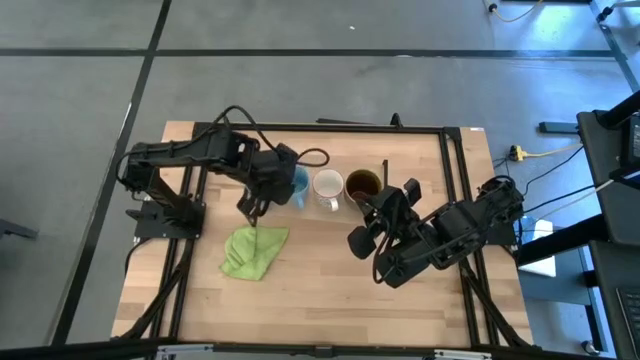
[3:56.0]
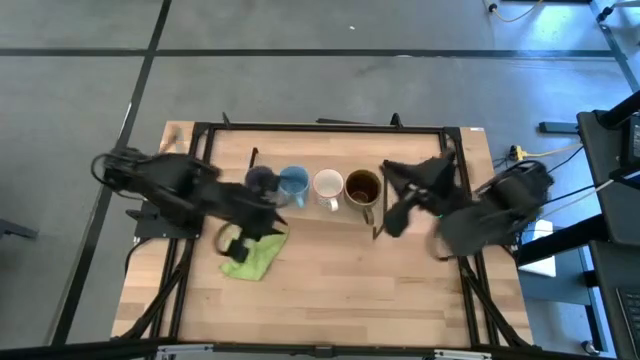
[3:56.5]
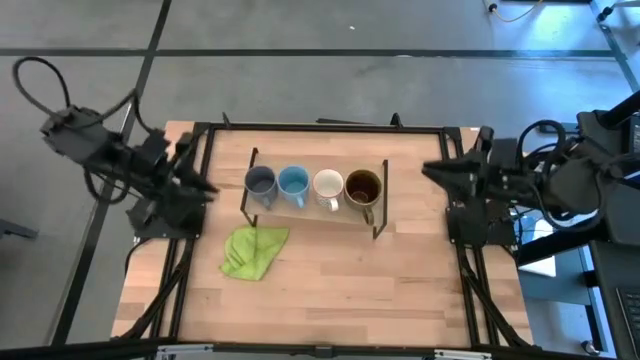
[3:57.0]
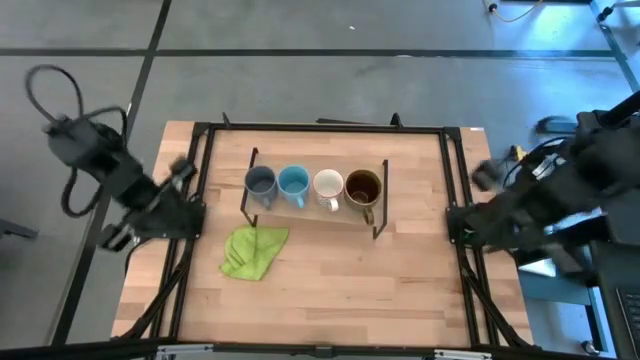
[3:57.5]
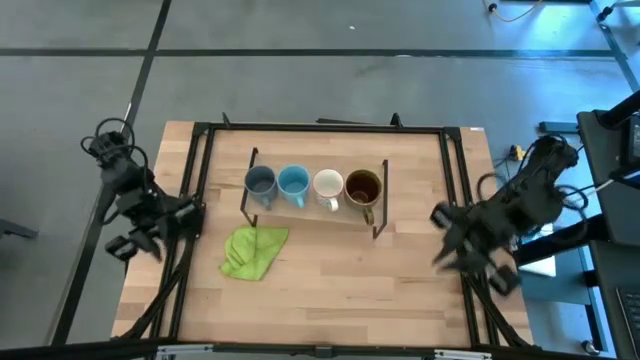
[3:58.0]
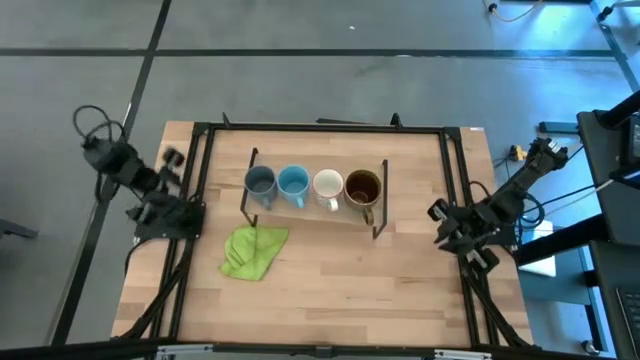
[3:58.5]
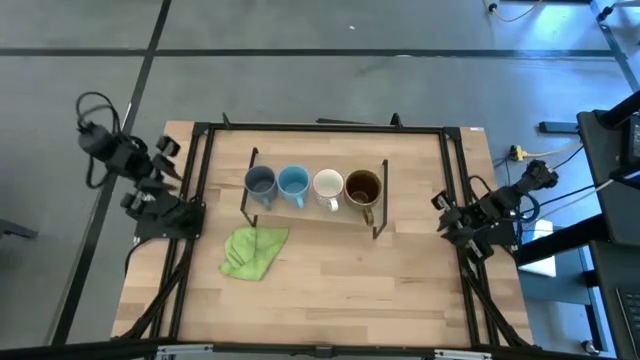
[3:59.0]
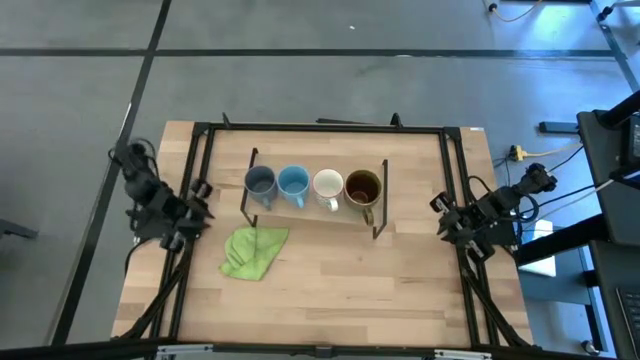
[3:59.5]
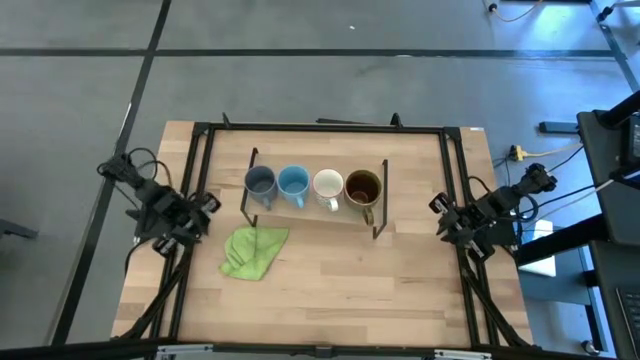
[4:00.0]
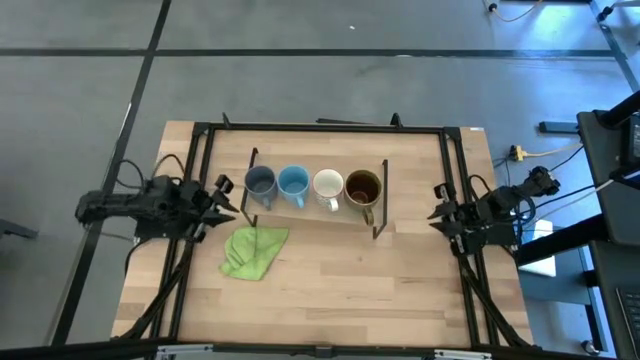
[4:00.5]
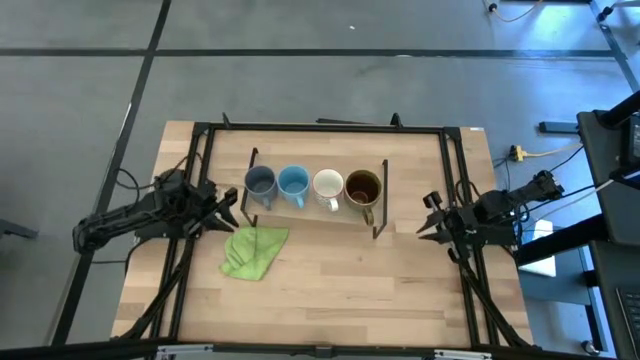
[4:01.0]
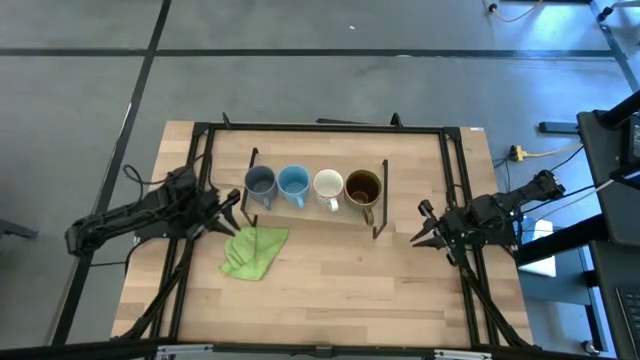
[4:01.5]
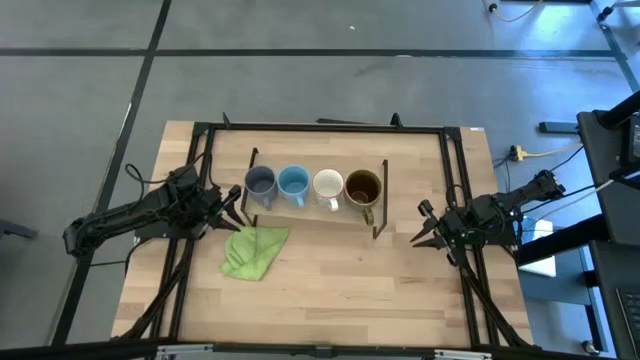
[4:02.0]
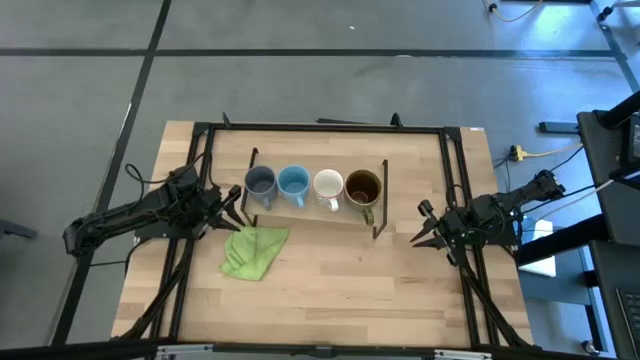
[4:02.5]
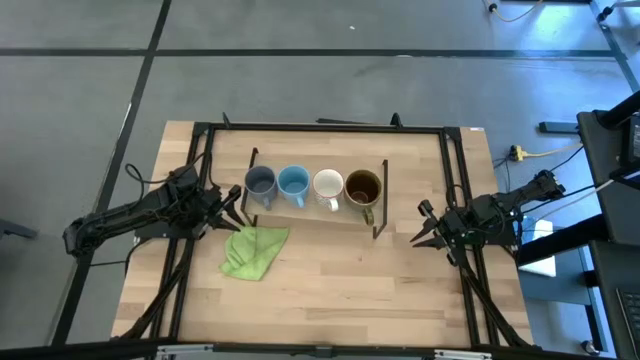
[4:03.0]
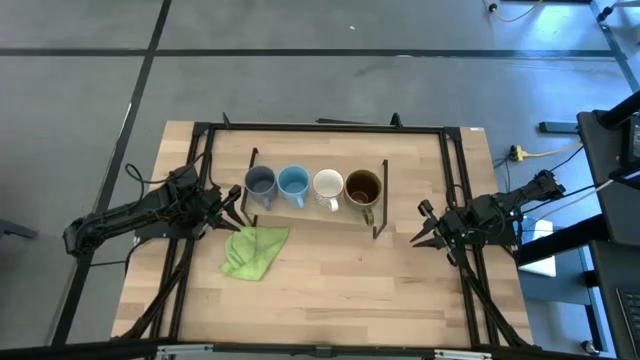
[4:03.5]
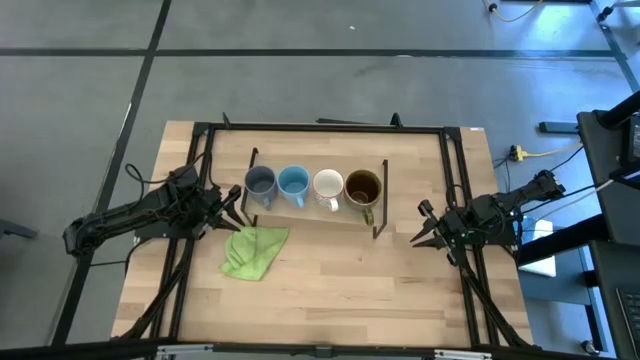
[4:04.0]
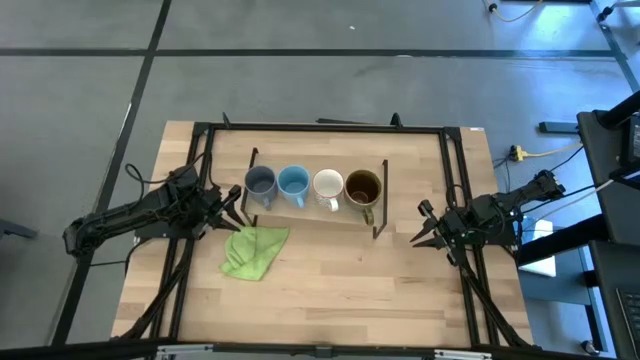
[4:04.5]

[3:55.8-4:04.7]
Task: Stack small to large cups/mugs on shelf
Return to Home Position

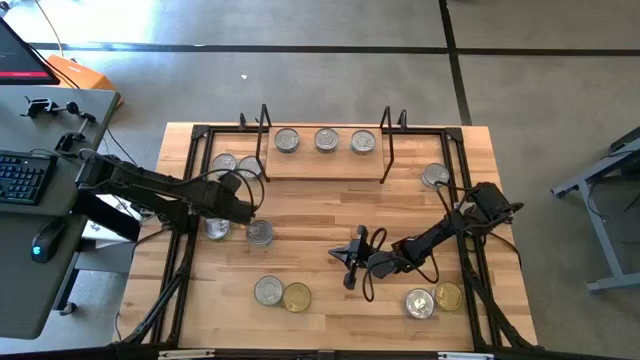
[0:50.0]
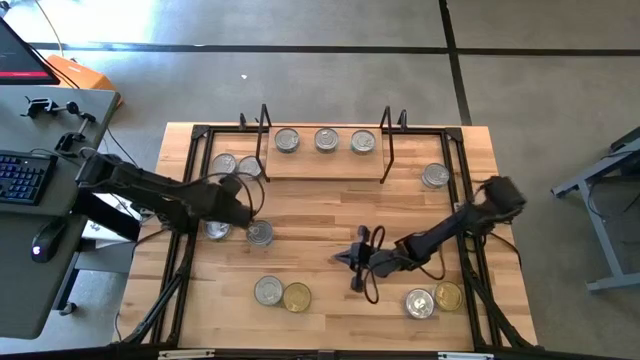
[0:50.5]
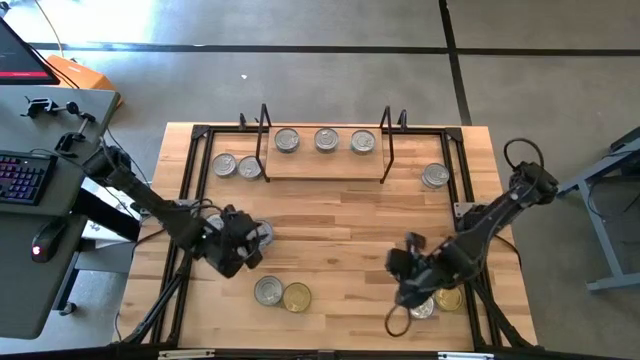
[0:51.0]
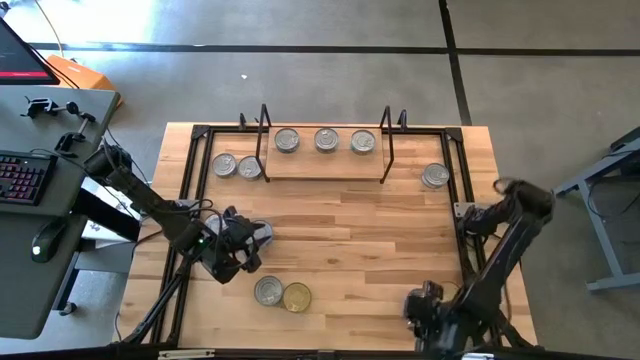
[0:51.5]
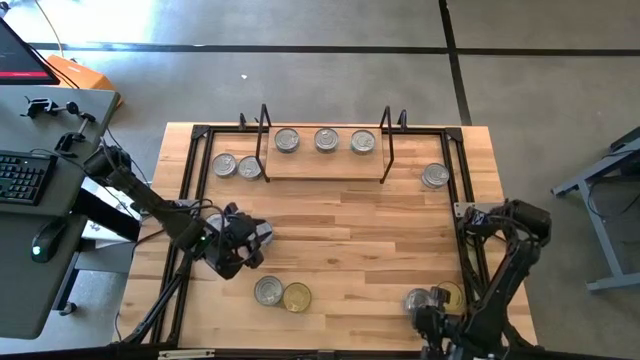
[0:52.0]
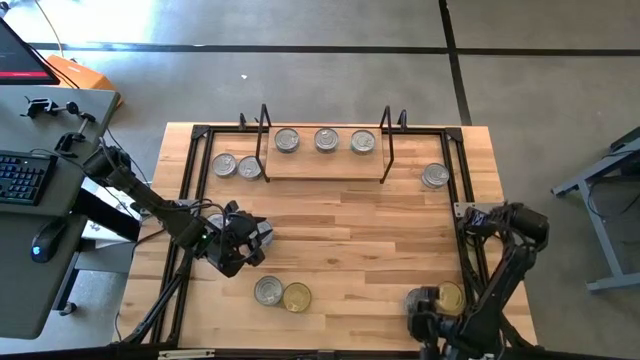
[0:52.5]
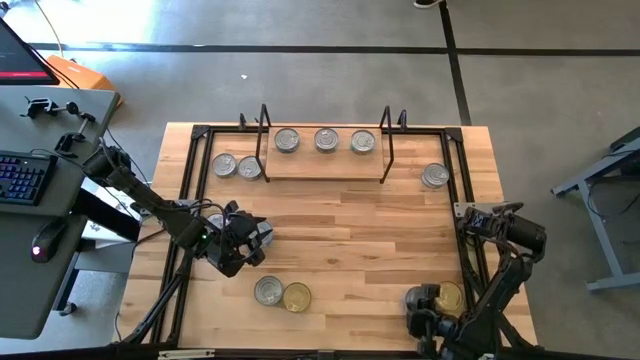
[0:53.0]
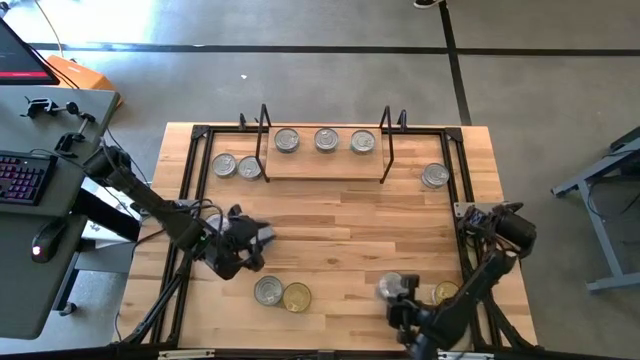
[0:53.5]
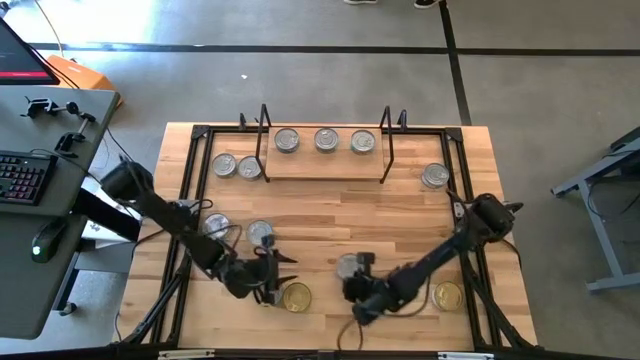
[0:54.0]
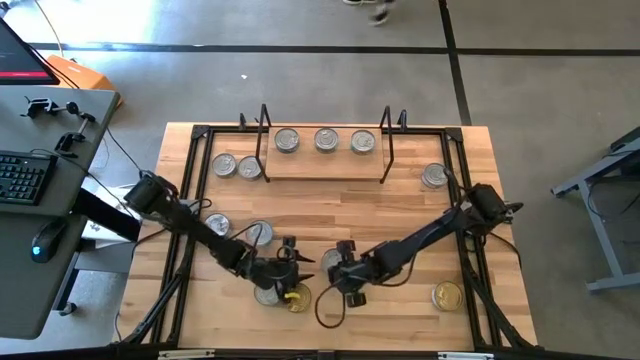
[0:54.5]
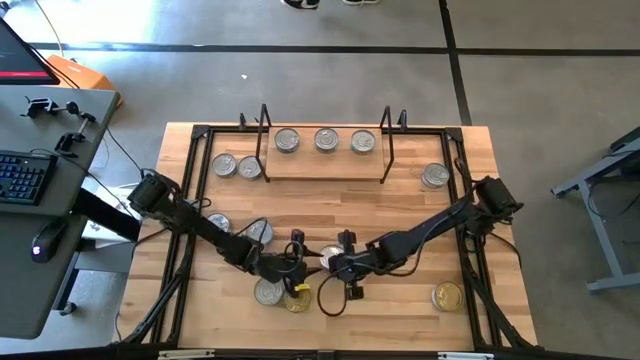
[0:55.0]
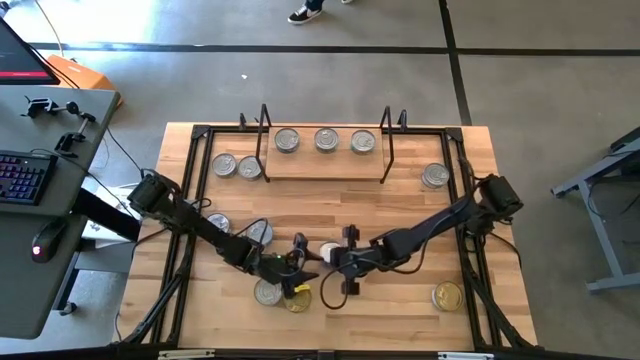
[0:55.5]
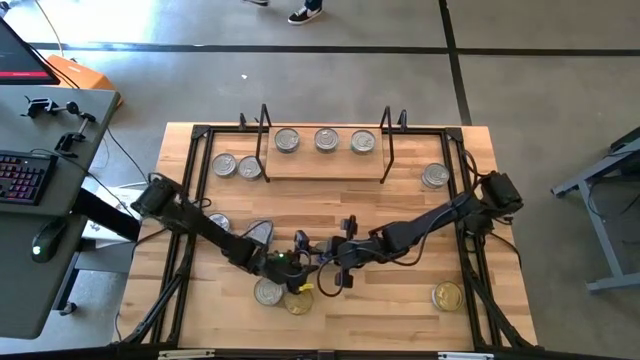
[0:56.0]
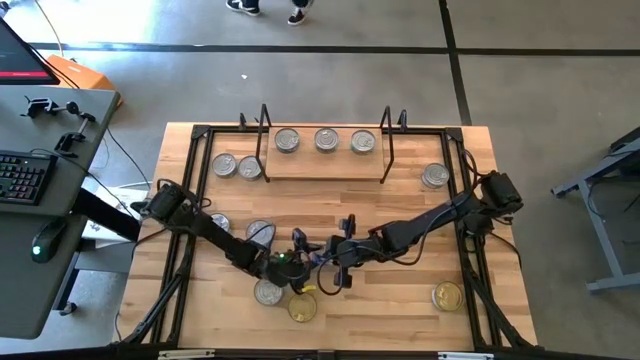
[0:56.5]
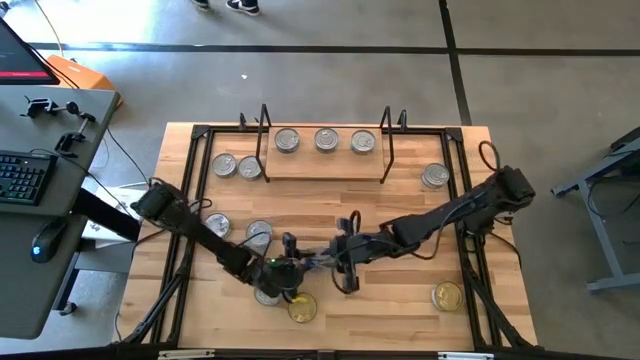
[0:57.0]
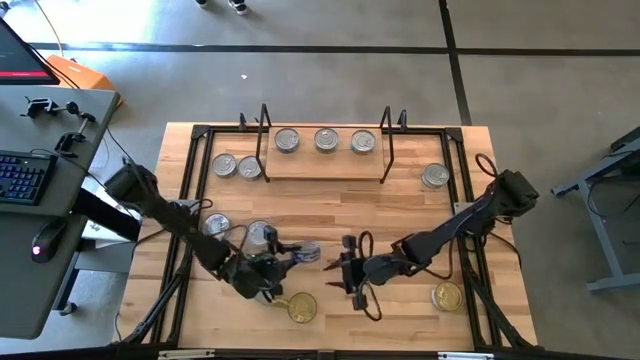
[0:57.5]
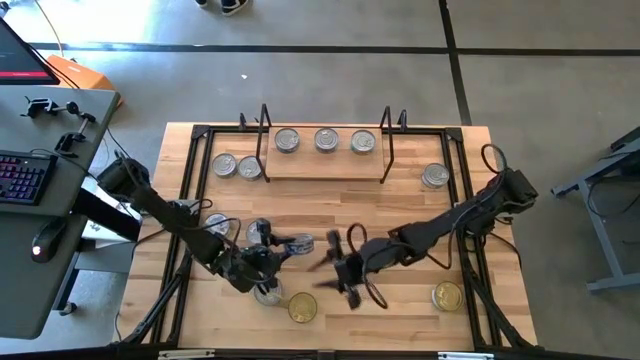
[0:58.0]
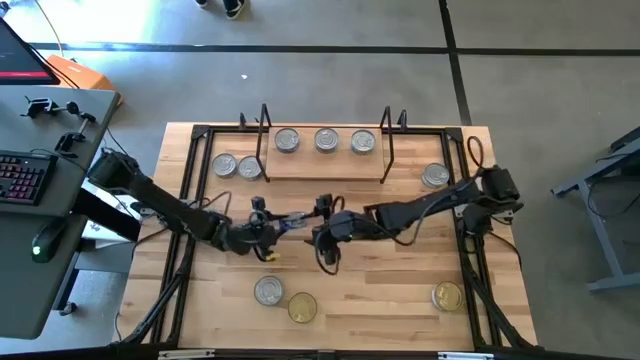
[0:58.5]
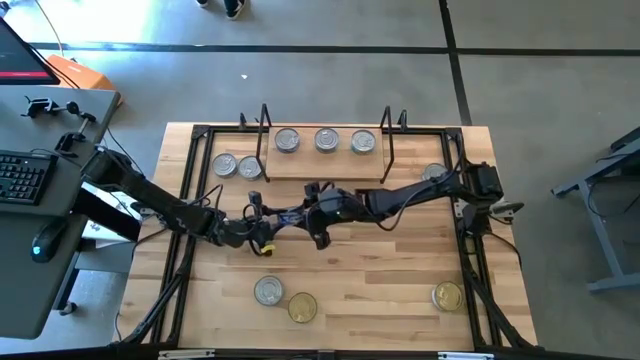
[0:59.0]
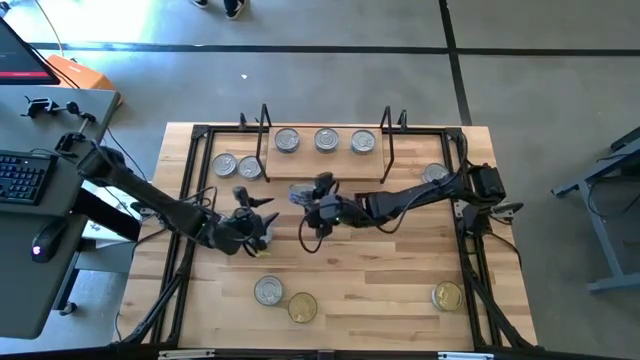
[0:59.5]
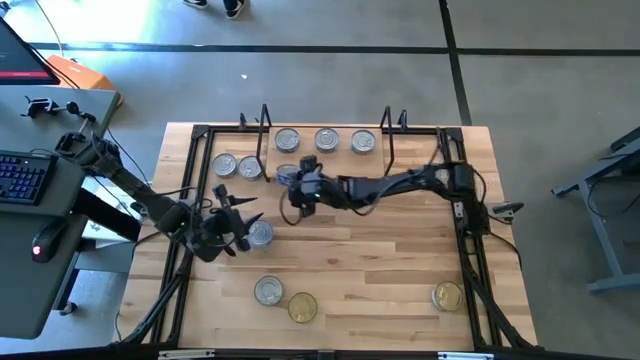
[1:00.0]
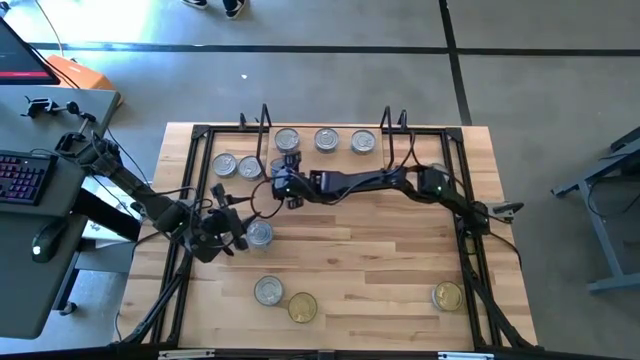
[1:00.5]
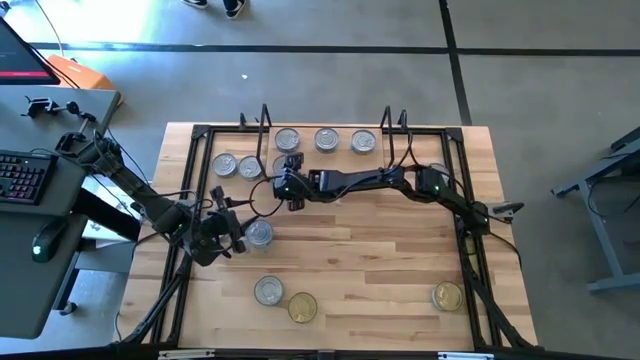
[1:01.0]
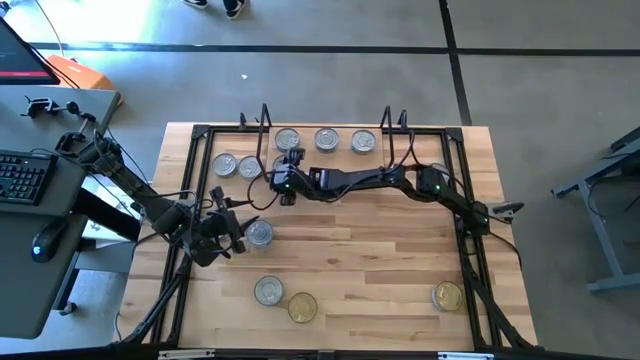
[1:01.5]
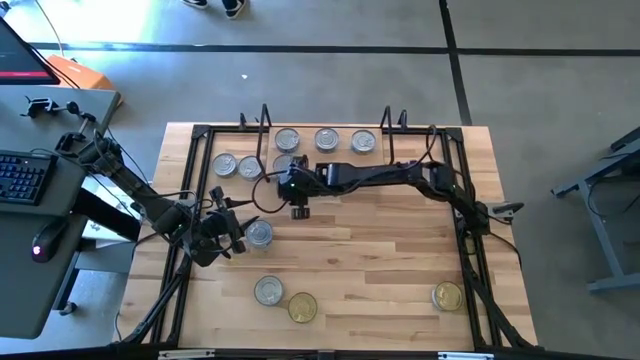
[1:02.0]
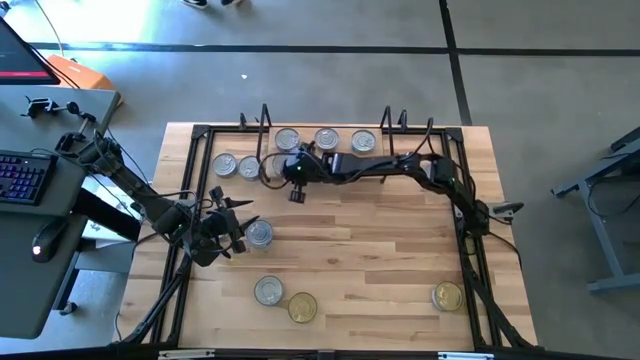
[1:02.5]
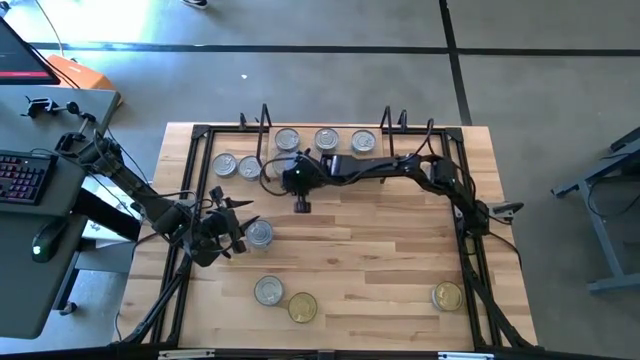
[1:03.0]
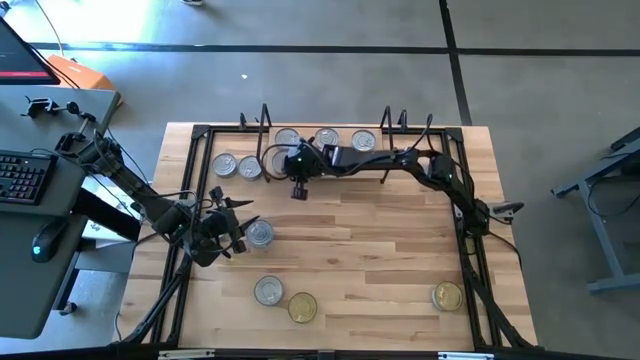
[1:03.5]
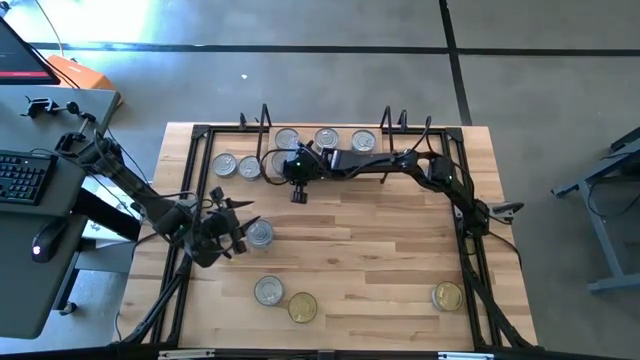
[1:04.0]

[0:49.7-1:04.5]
Task: Stack canned seafood by type on shelf
Put the blue tuna can on the shelf
